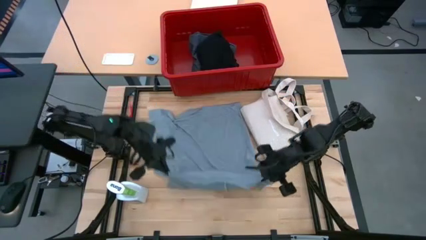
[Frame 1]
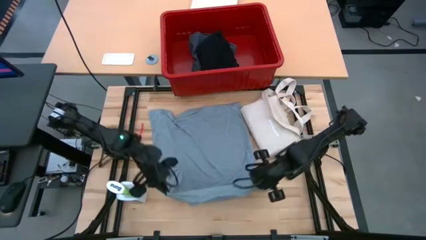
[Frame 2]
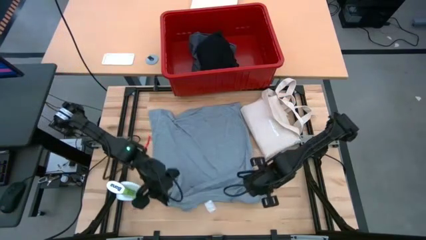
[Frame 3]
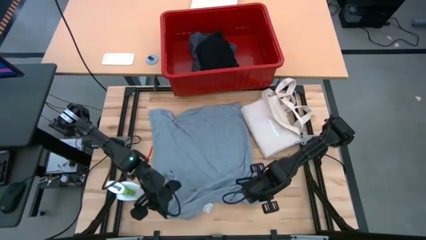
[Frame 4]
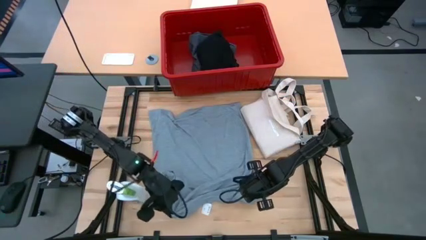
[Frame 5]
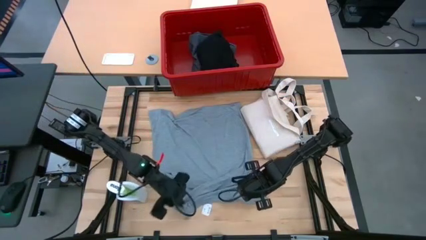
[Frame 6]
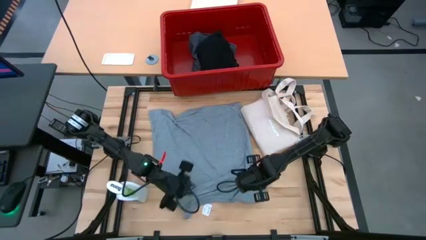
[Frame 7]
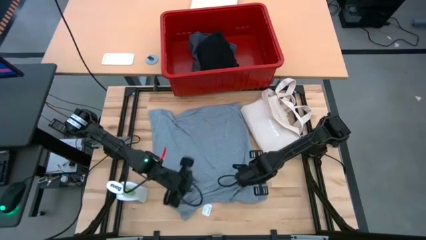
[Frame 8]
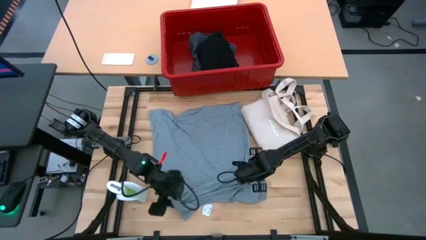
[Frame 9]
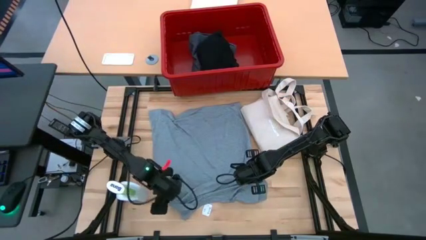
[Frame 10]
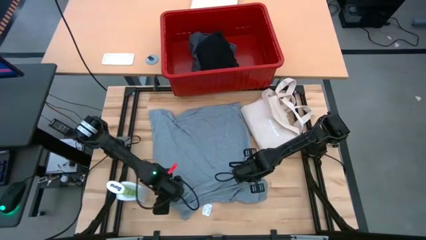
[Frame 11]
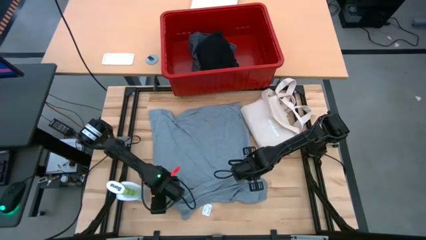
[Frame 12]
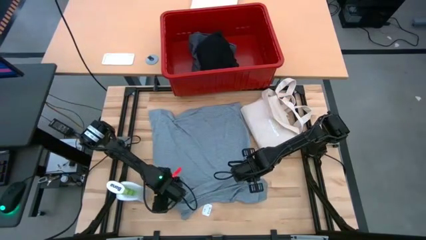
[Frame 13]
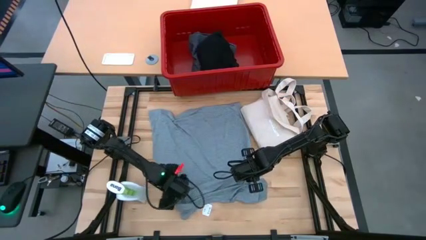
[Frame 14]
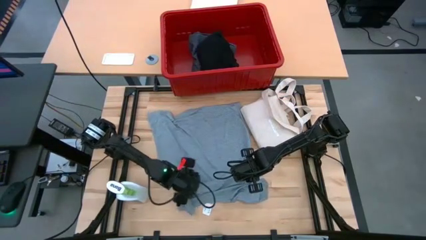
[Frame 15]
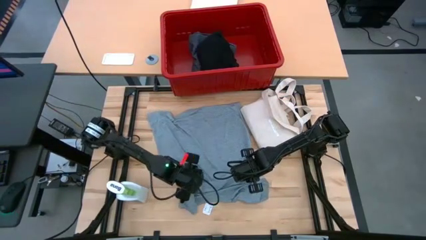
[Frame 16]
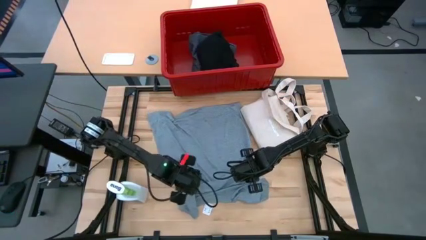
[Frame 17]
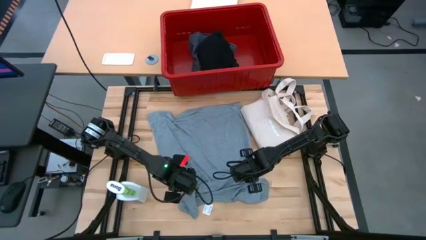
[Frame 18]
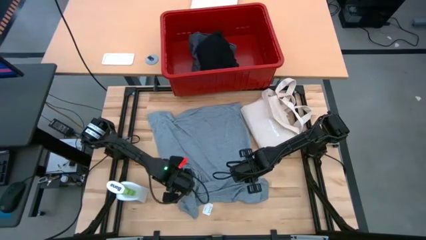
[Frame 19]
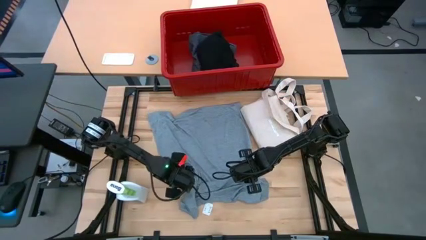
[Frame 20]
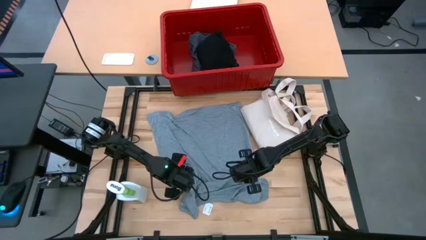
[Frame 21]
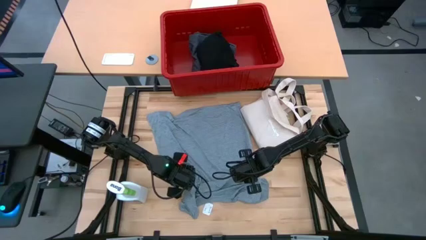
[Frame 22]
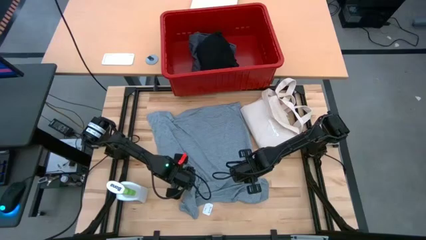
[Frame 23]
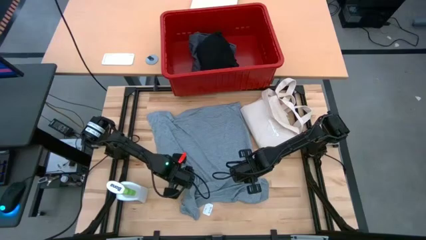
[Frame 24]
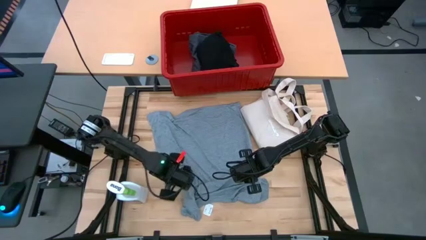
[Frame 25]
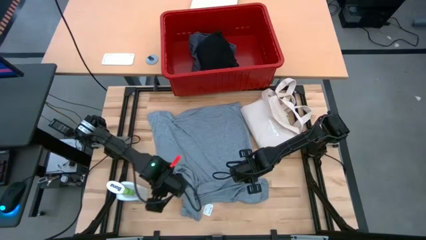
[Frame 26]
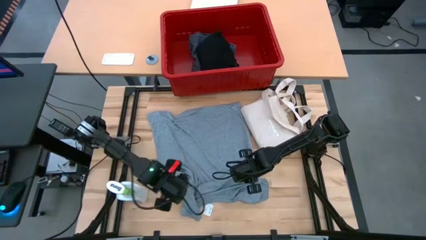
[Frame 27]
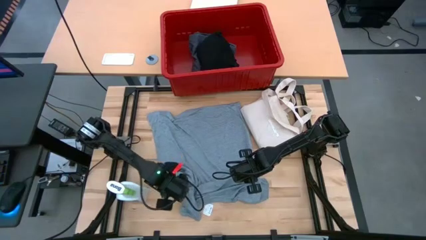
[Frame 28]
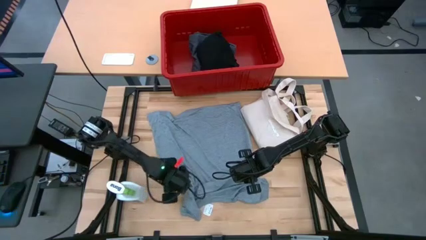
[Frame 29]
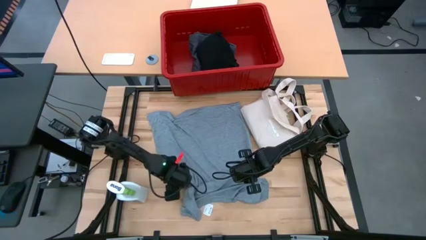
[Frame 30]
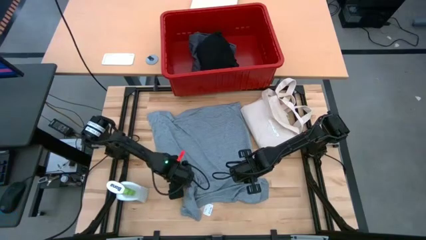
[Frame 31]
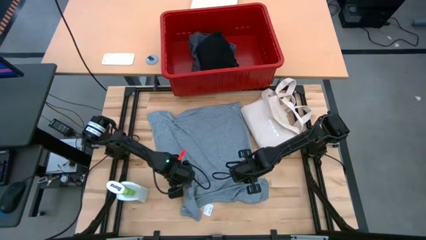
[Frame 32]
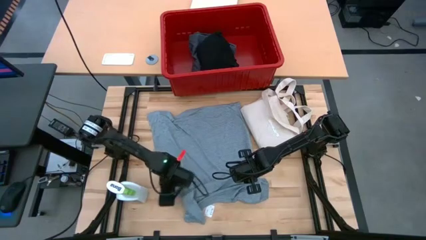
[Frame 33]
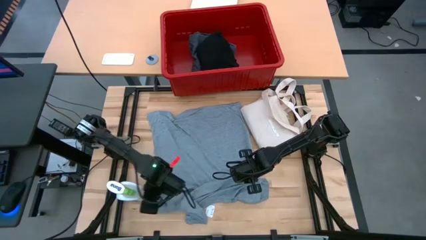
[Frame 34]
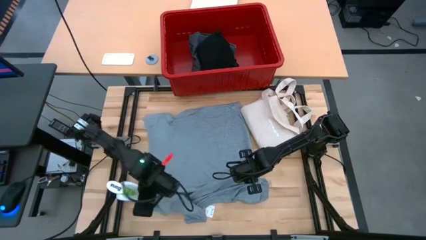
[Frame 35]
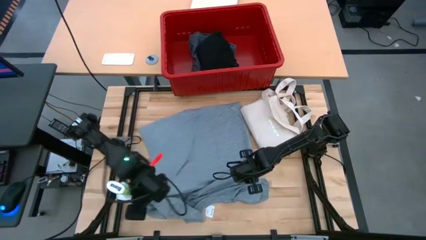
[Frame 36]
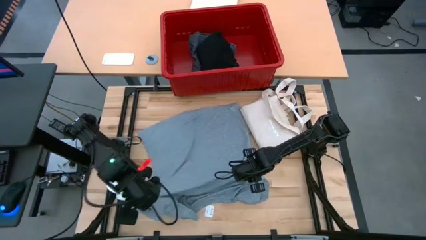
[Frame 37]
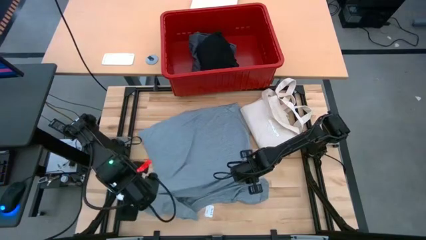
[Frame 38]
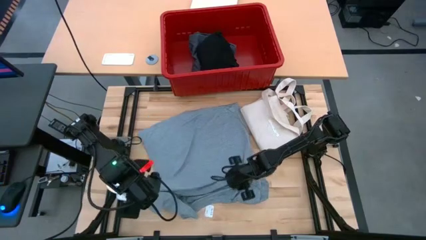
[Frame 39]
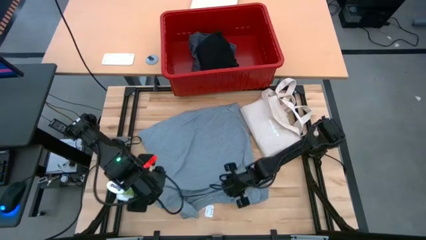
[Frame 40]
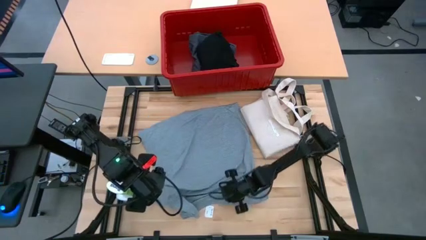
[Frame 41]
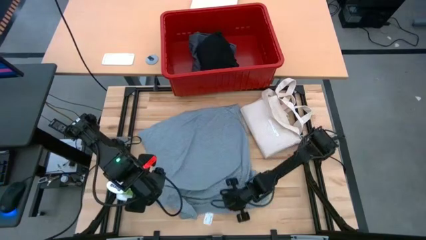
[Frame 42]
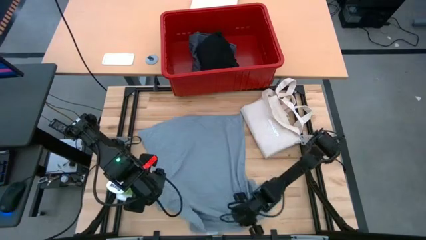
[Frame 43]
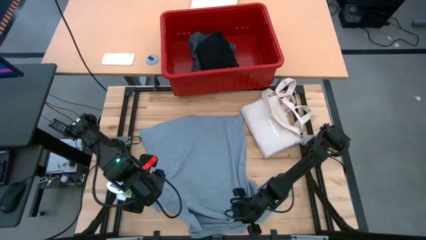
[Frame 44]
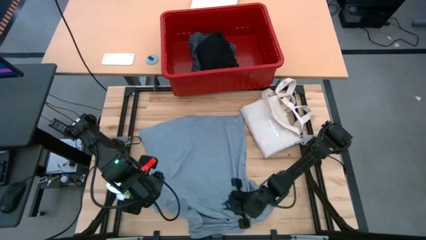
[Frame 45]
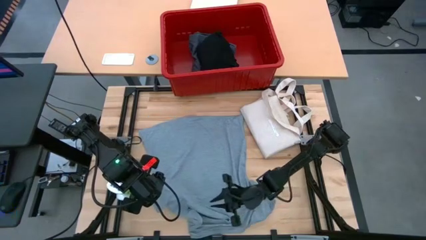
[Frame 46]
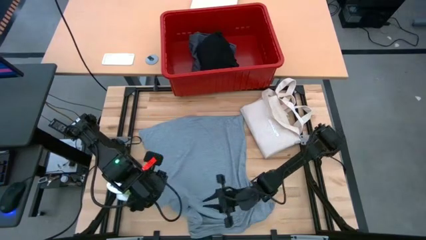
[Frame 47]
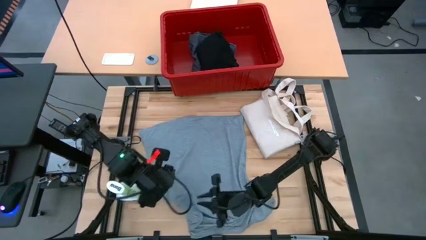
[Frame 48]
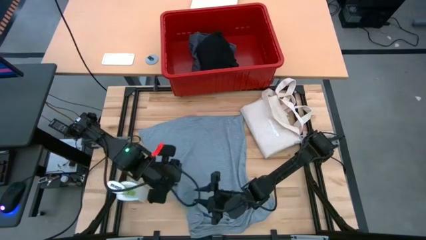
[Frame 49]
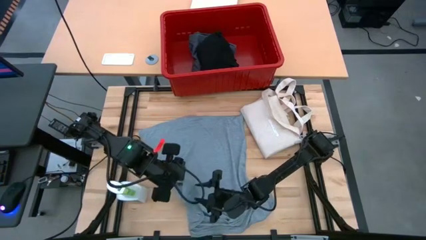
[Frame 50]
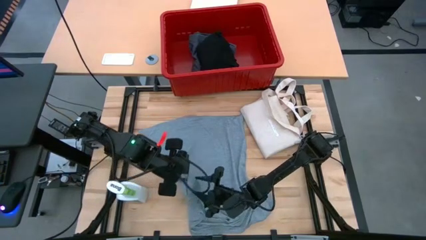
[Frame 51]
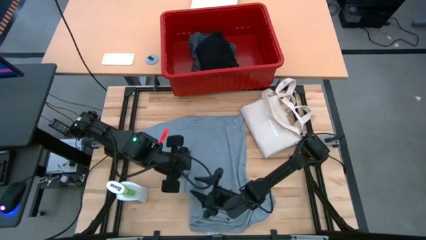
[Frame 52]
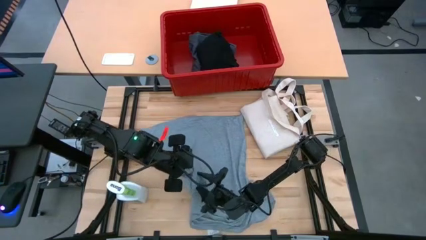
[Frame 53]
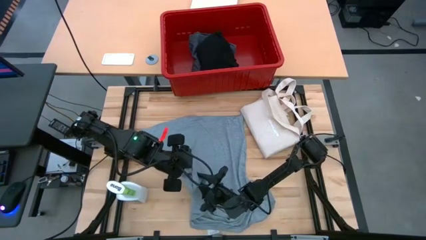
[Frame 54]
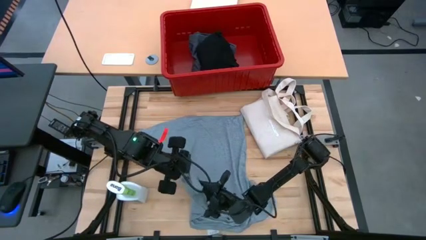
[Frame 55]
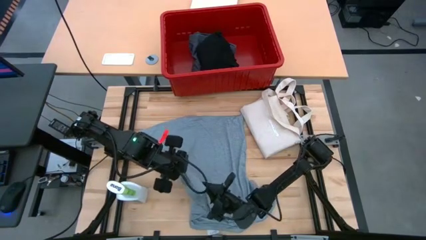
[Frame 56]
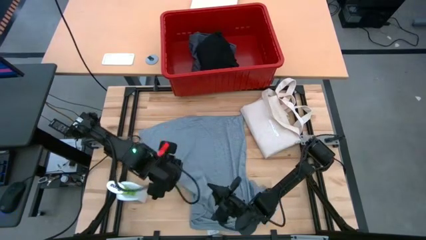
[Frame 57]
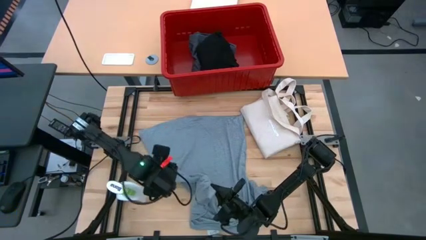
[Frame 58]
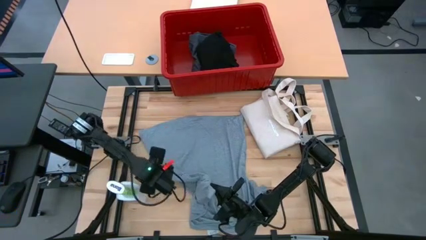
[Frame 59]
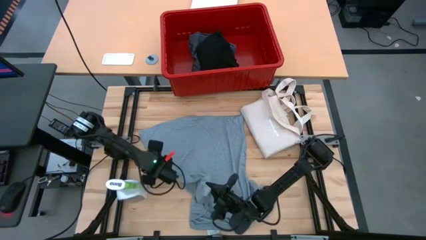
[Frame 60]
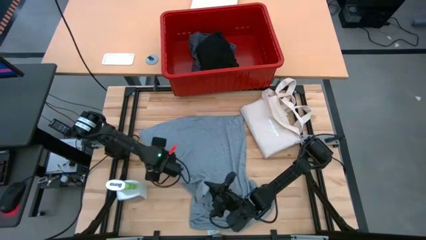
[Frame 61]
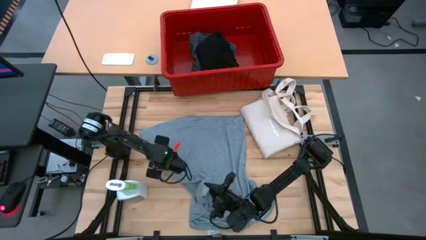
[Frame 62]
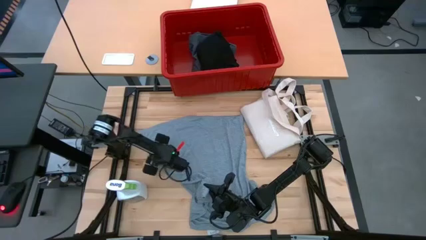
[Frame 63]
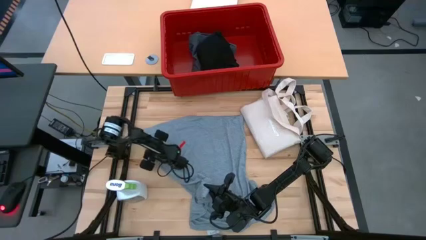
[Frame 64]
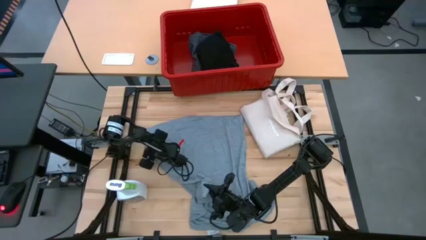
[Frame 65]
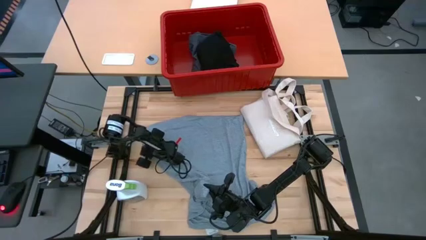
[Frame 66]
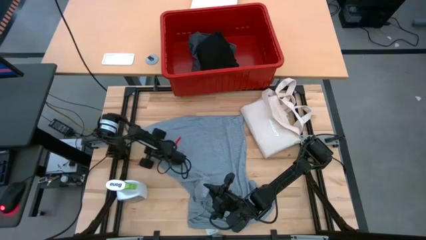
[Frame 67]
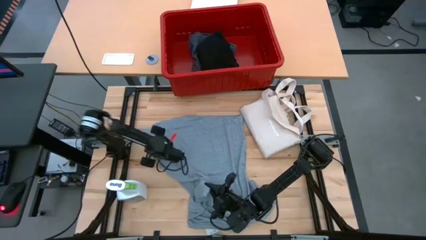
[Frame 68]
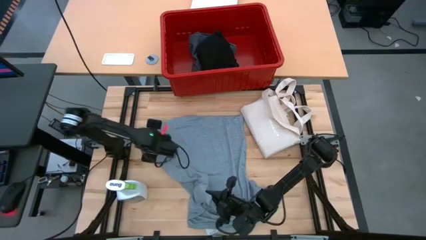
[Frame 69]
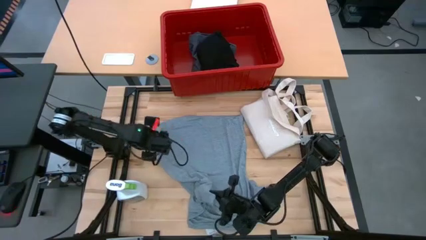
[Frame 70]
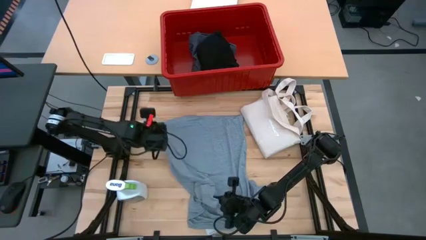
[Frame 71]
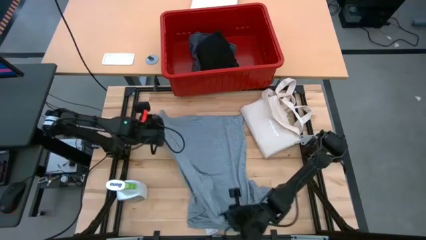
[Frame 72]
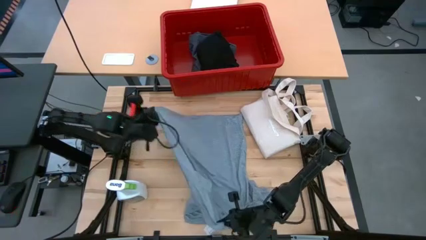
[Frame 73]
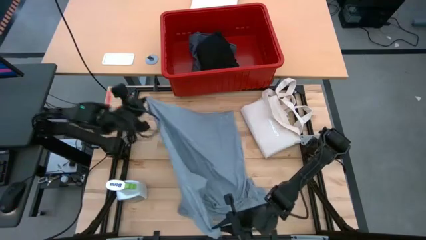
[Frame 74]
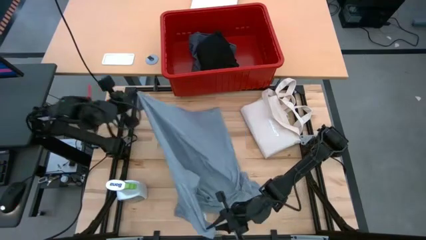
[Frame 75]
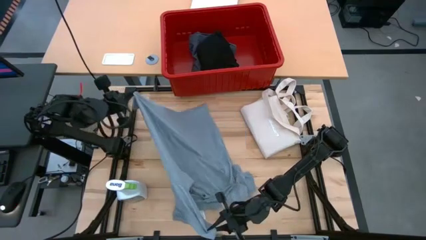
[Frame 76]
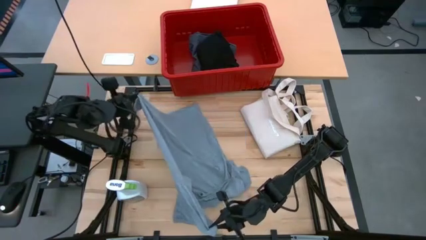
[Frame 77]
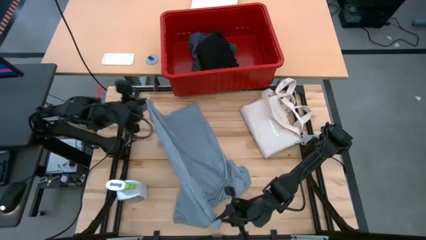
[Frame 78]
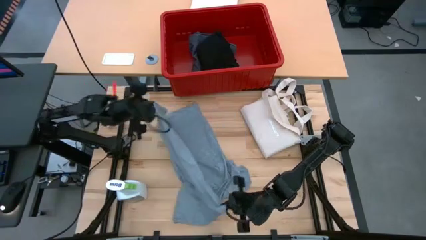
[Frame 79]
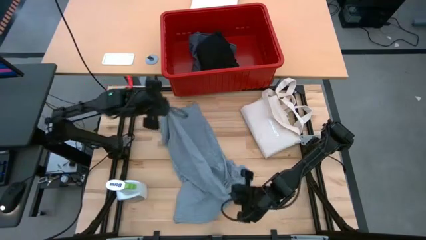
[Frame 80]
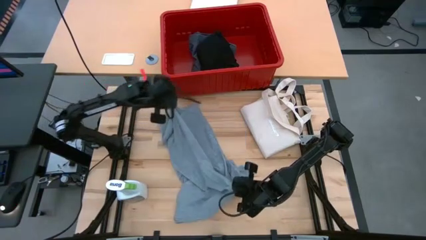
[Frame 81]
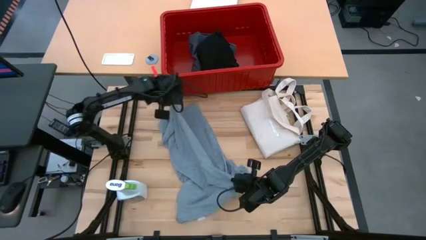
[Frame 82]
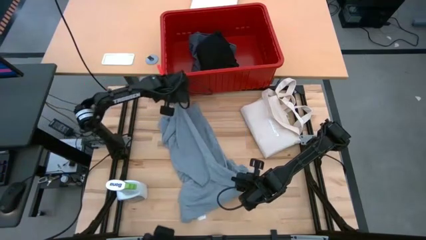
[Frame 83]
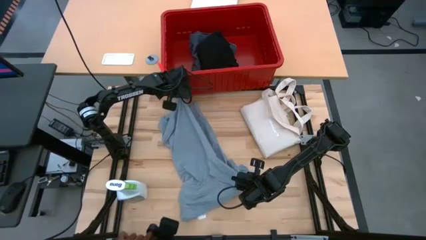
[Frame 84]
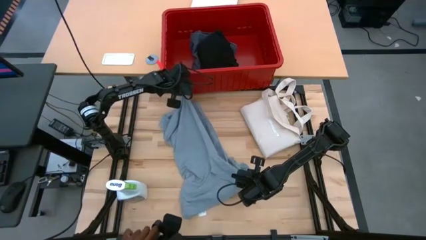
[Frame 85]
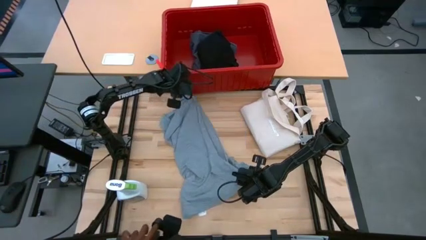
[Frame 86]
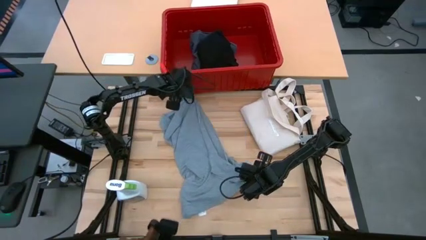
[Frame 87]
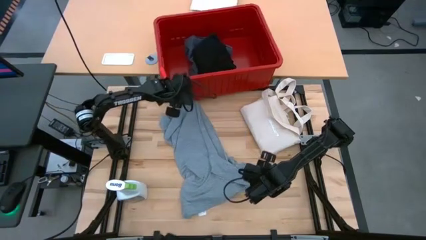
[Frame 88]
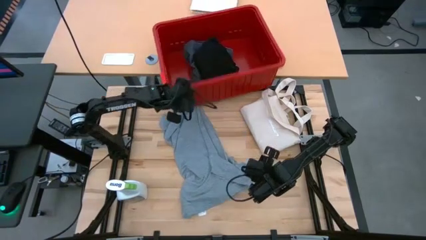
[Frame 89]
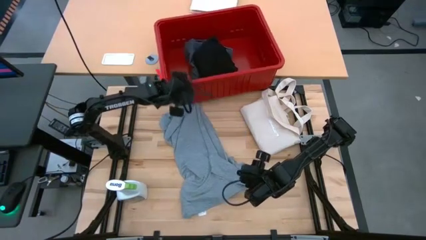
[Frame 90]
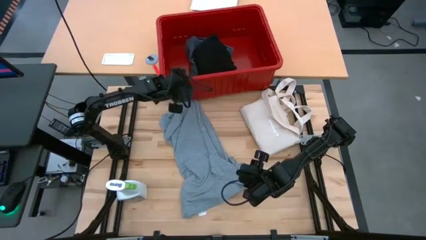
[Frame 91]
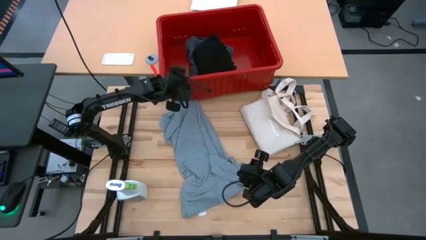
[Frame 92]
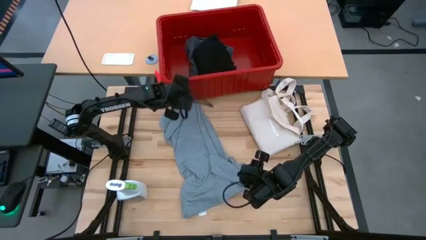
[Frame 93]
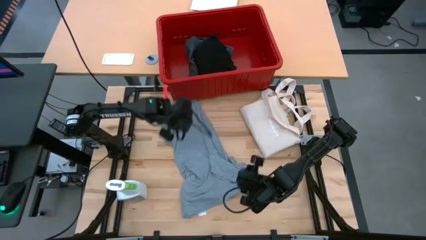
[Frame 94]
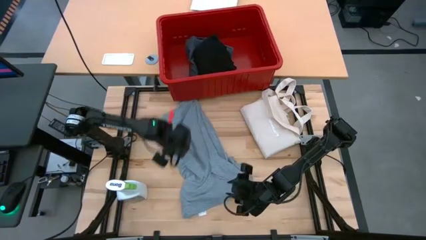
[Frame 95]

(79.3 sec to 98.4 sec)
Task: Fold Laundry from Bin
Fold the gray shirt
